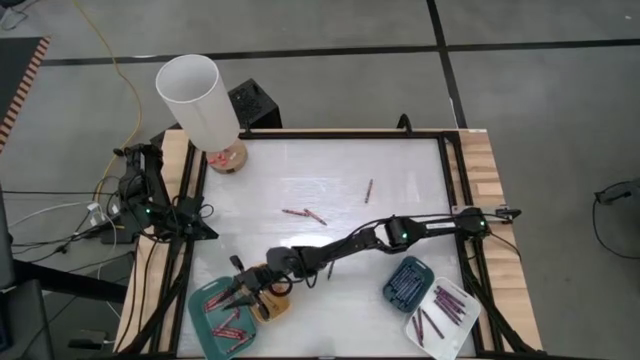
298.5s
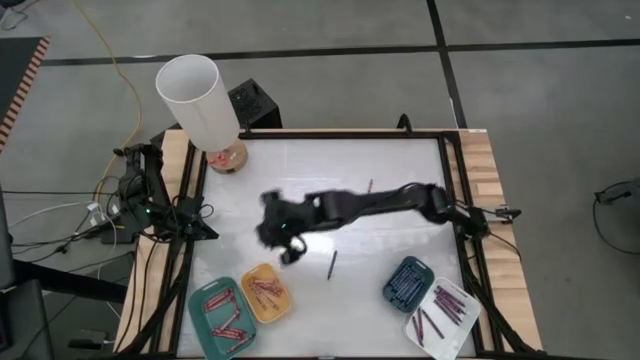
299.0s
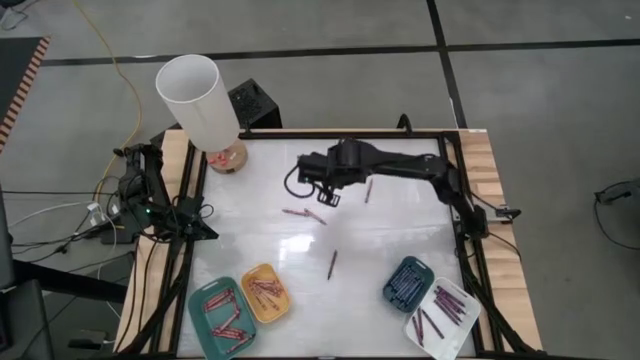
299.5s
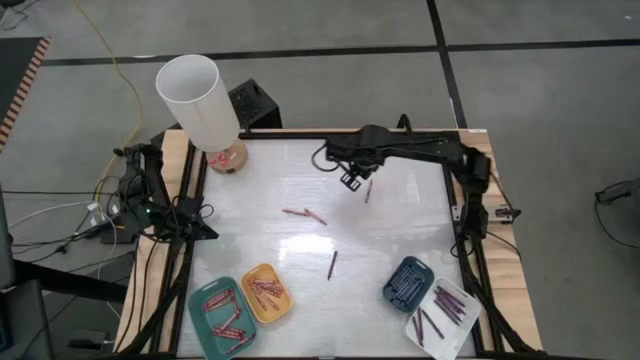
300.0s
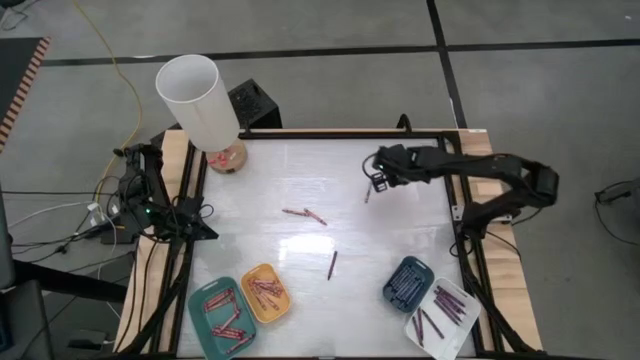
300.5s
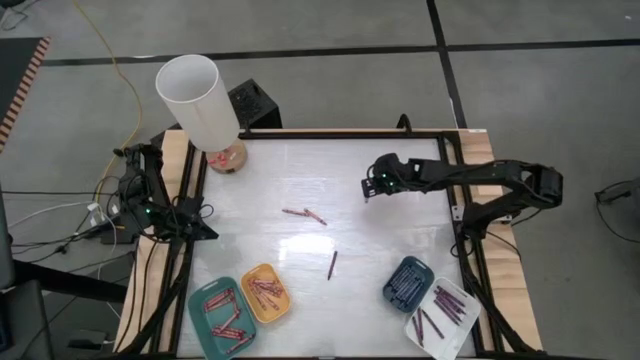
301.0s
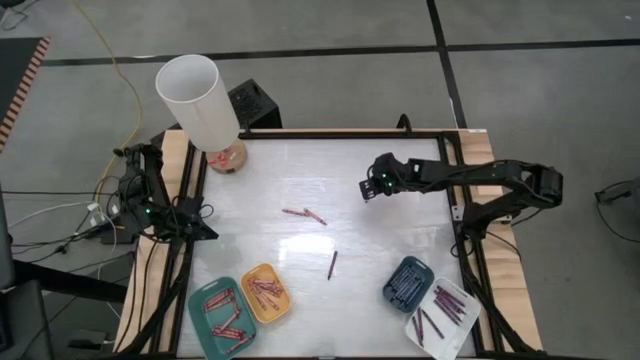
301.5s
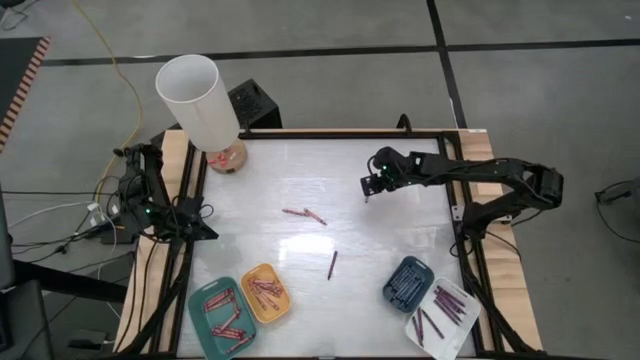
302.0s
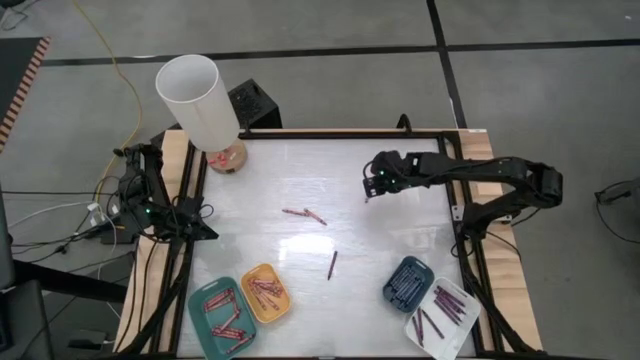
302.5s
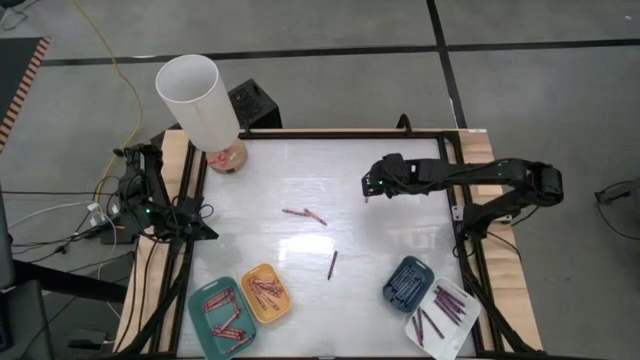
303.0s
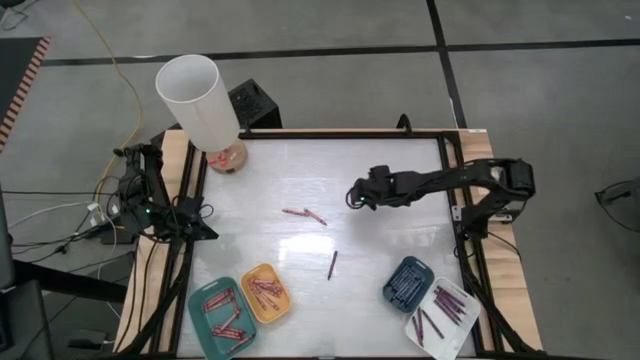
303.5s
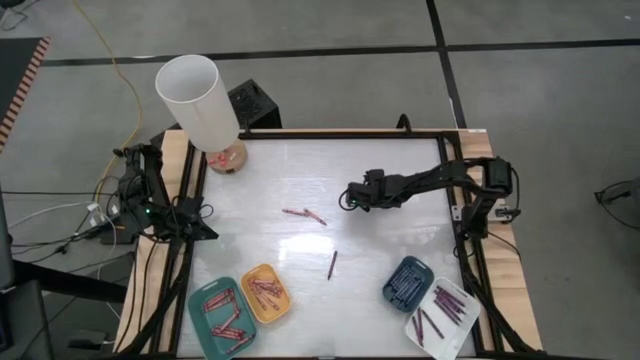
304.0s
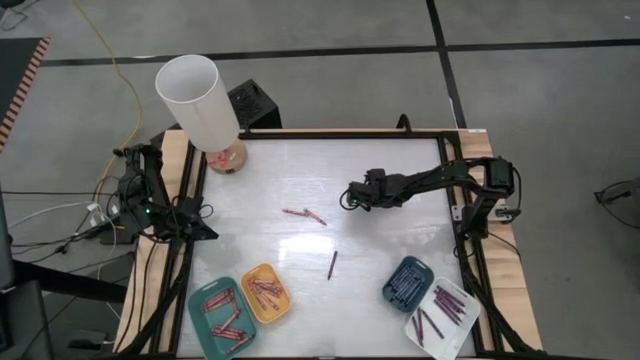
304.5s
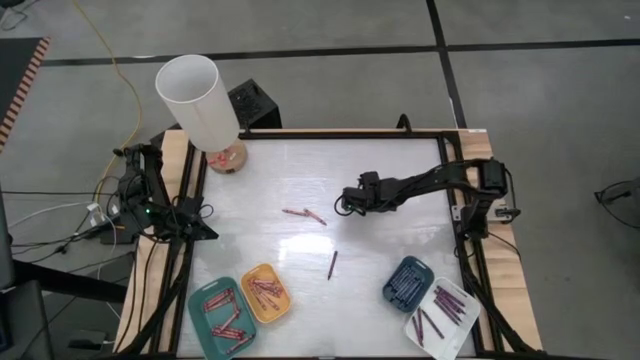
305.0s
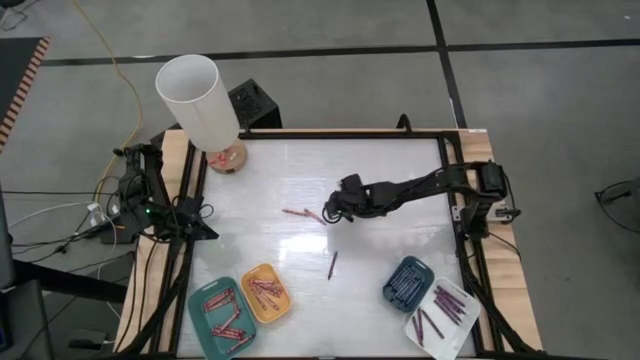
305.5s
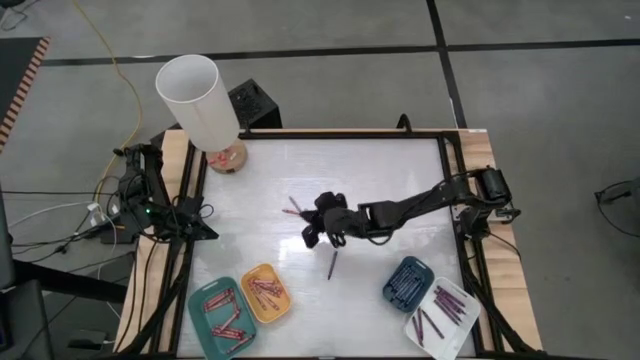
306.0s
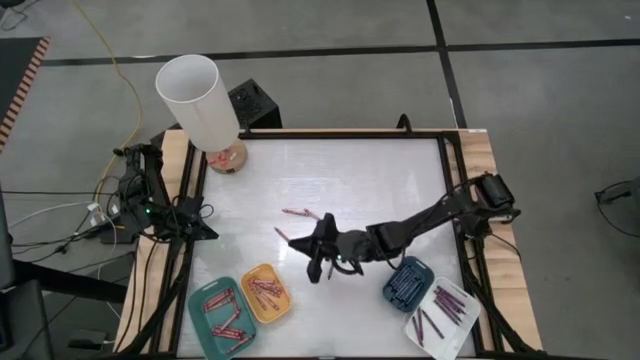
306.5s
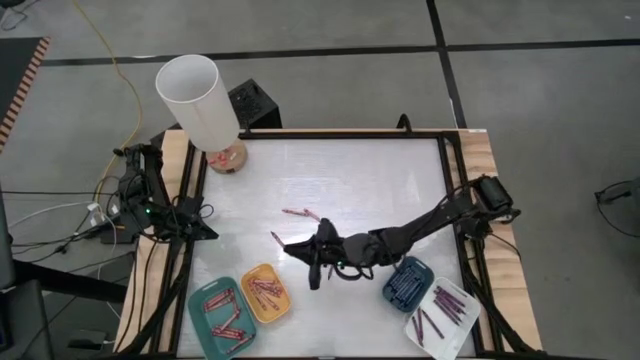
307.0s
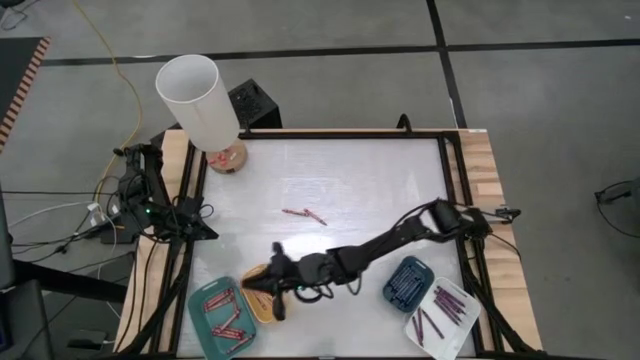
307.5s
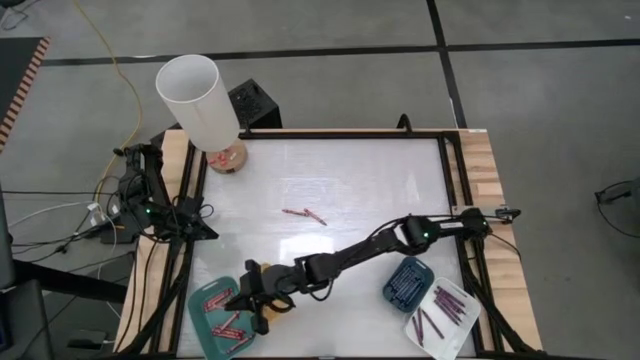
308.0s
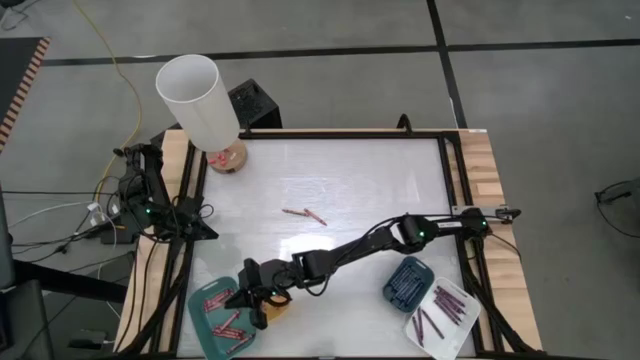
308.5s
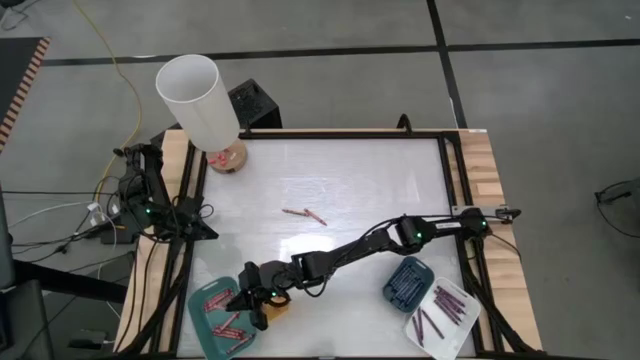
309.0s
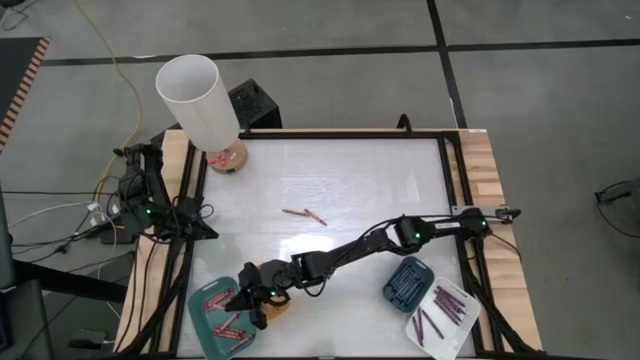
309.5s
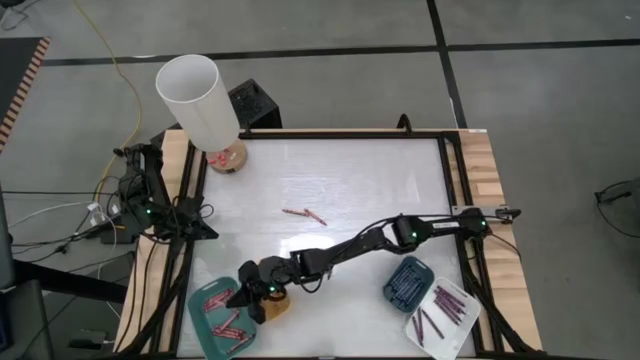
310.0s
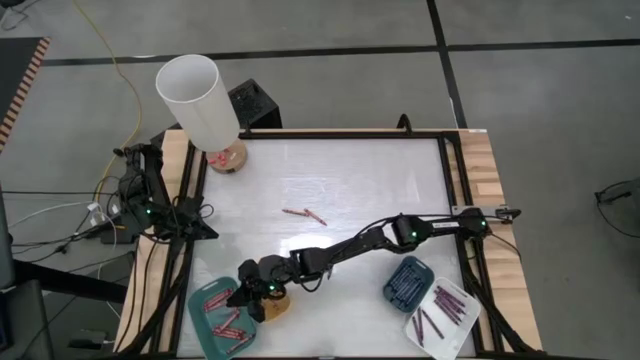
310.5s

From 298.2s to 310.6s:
Task: Sort crayons
Put the red crayon into the blue bin

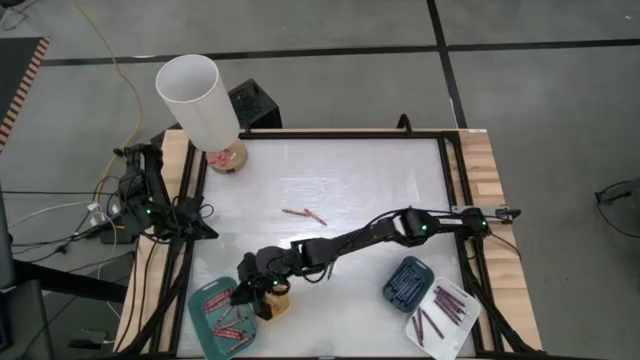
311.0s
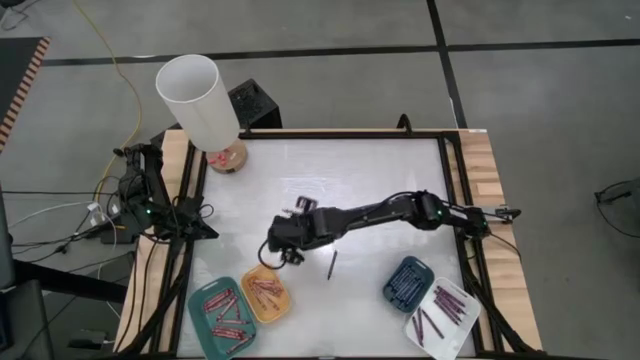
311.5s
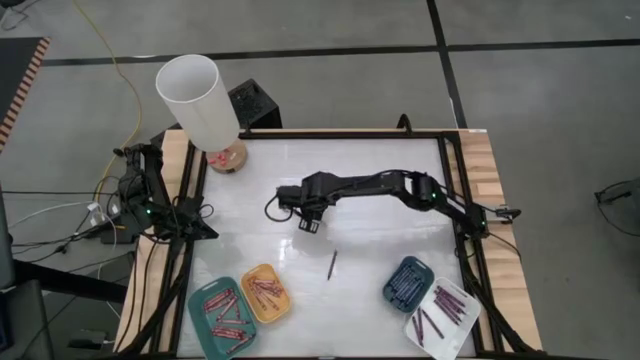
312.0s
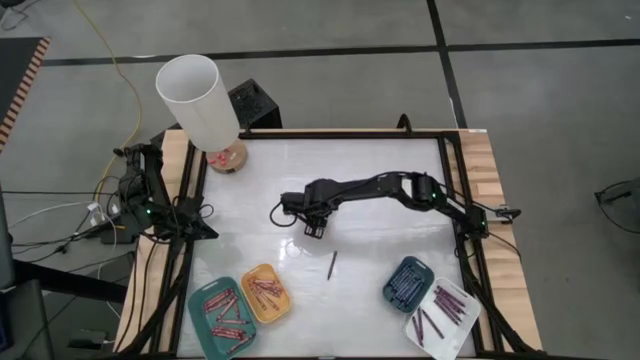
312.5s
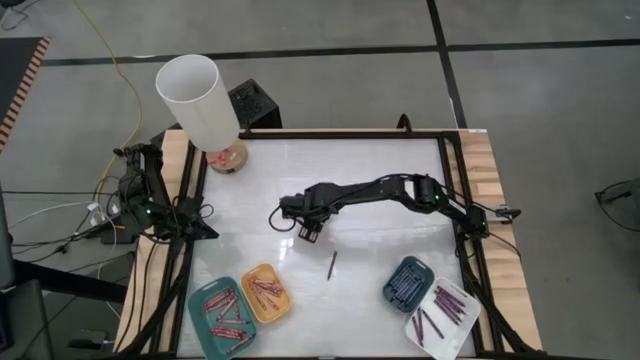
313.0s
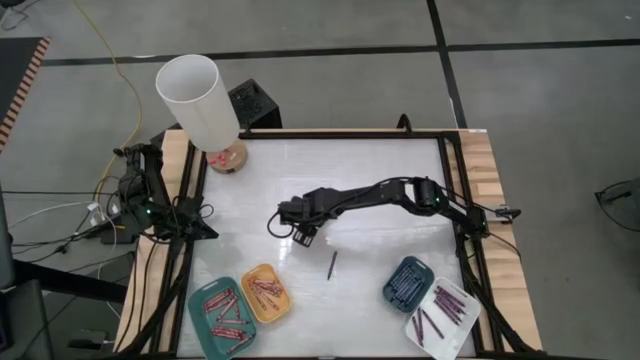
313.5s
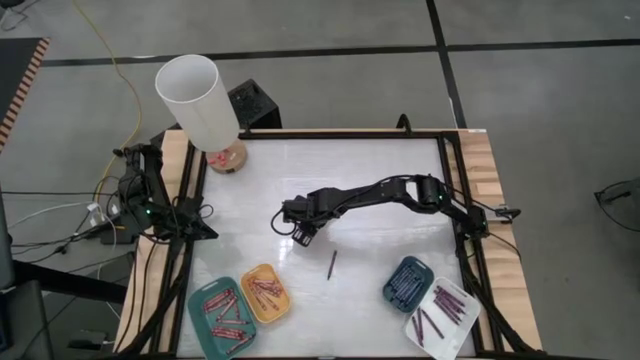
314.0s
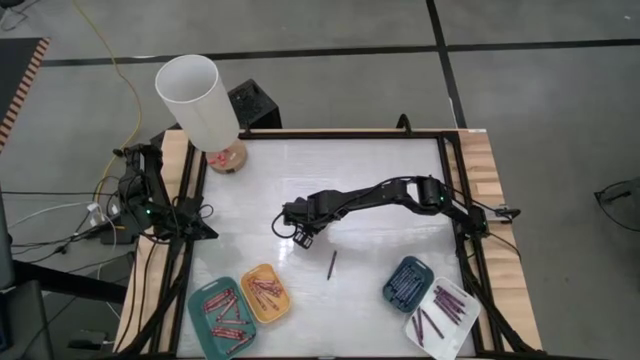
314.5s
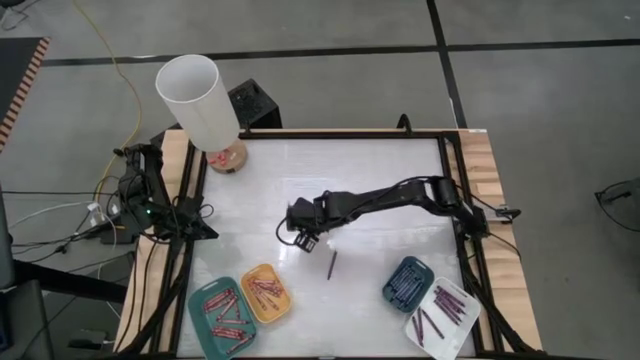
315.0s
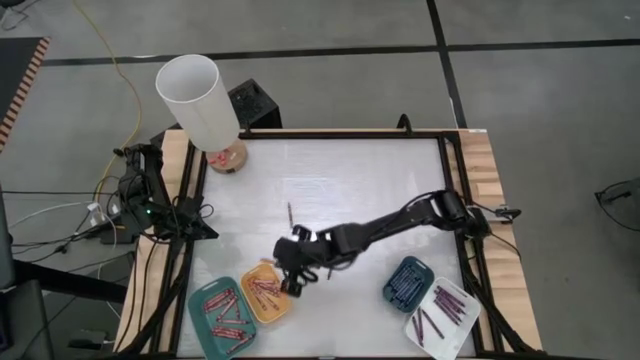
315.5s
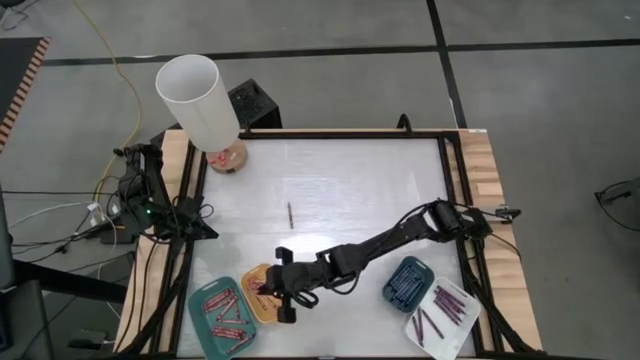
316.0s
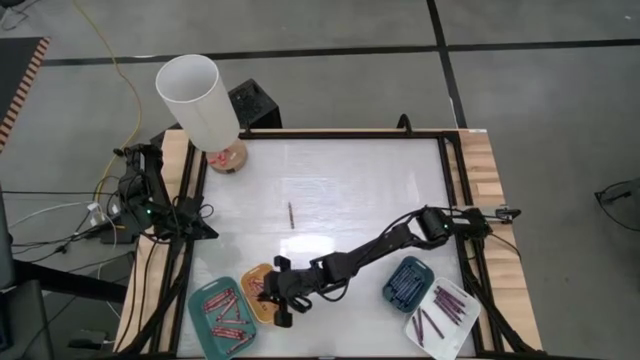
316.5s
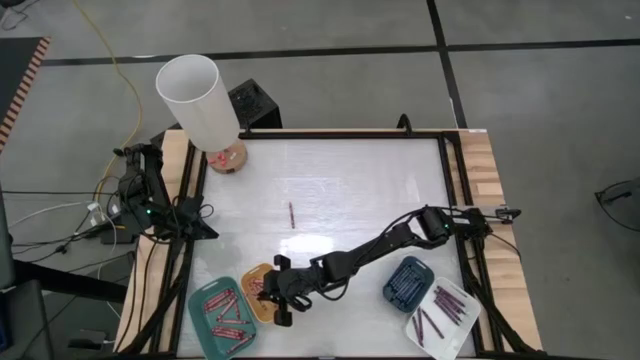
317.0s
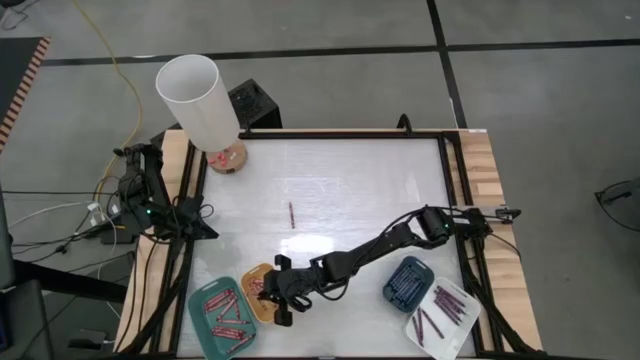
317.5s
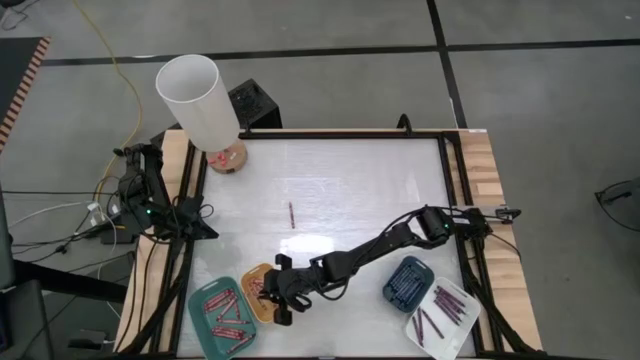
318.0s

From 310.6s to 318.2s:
Put the pink crayon into the yellow bin
